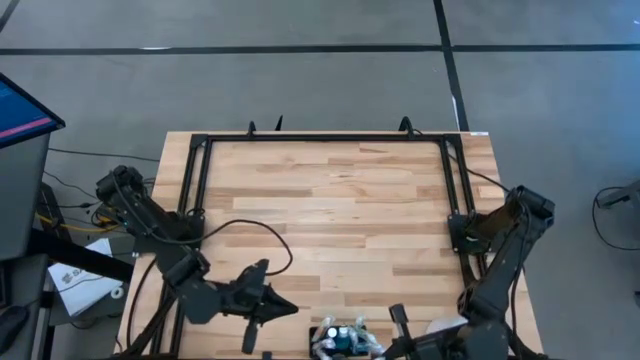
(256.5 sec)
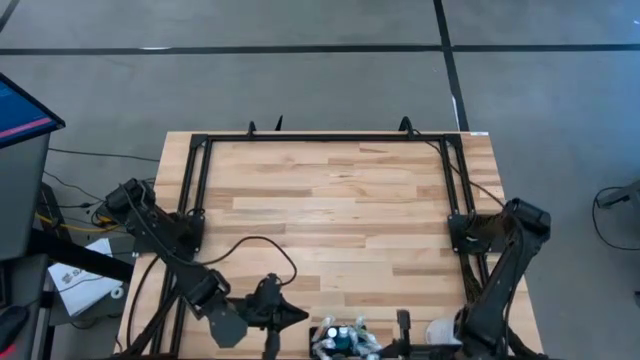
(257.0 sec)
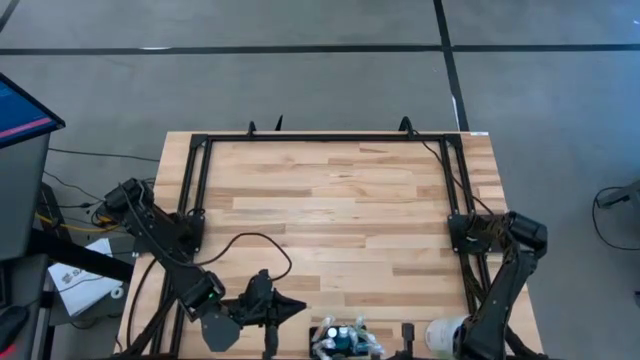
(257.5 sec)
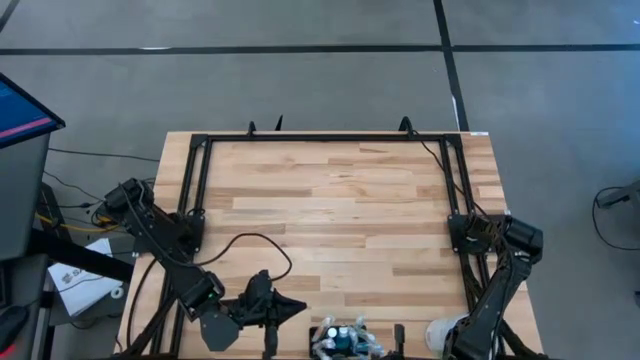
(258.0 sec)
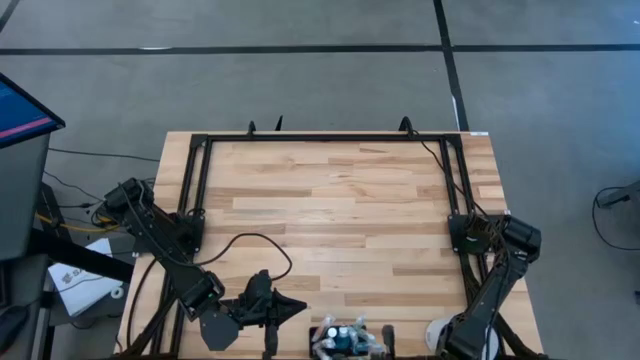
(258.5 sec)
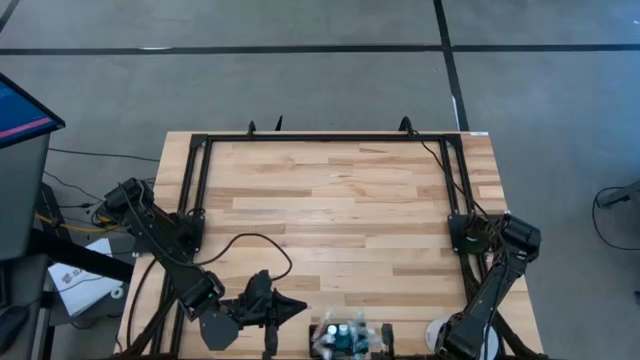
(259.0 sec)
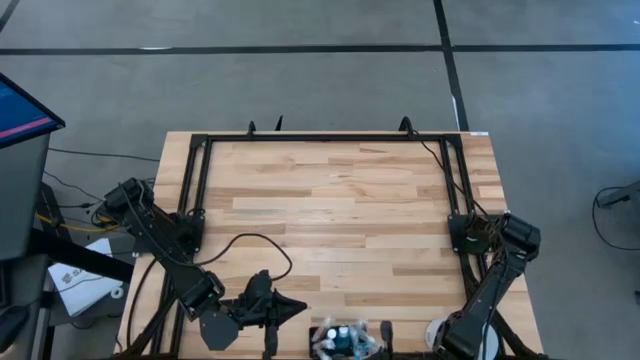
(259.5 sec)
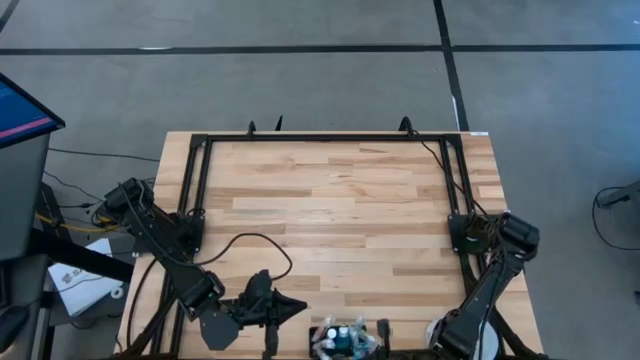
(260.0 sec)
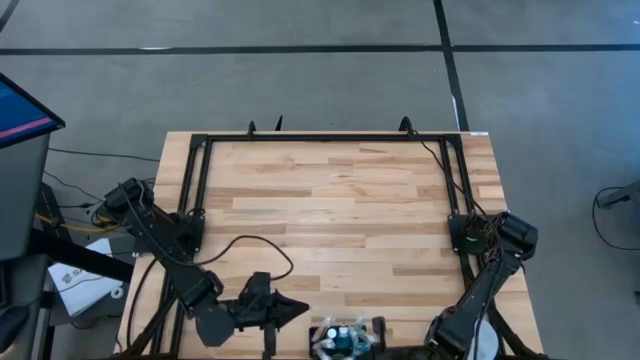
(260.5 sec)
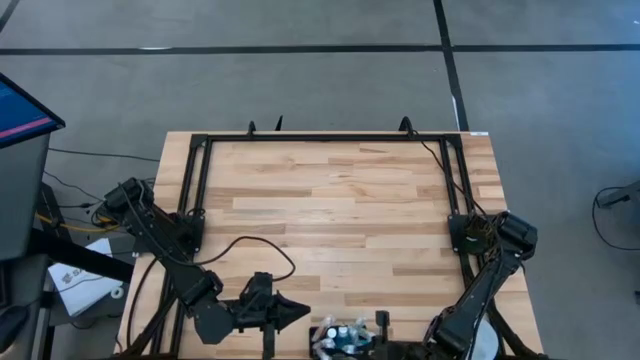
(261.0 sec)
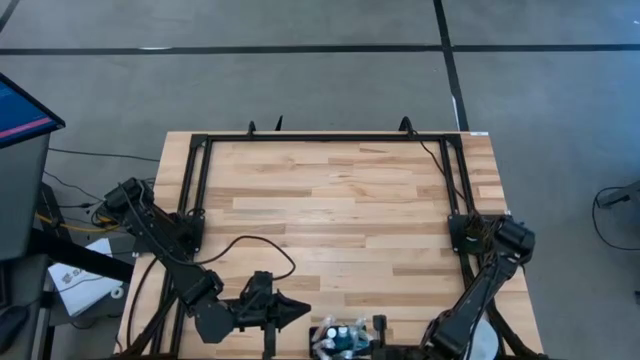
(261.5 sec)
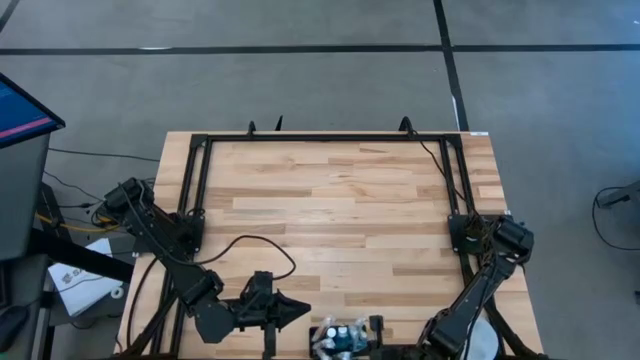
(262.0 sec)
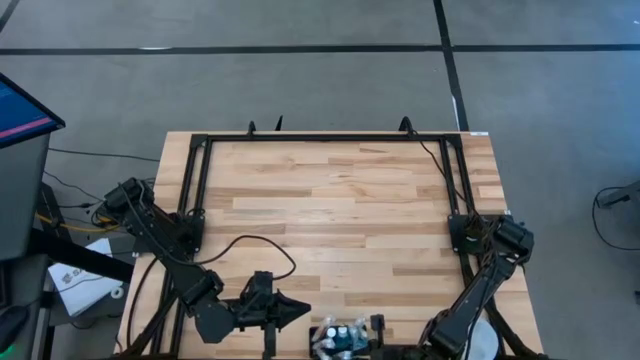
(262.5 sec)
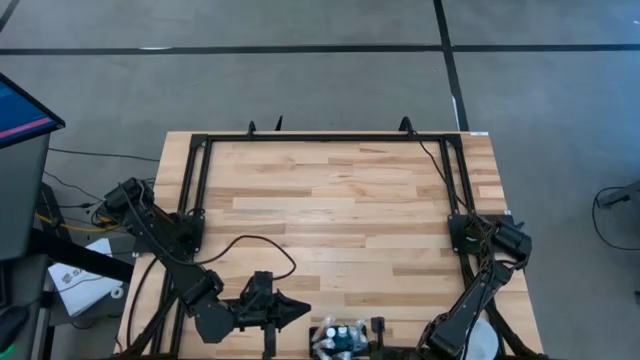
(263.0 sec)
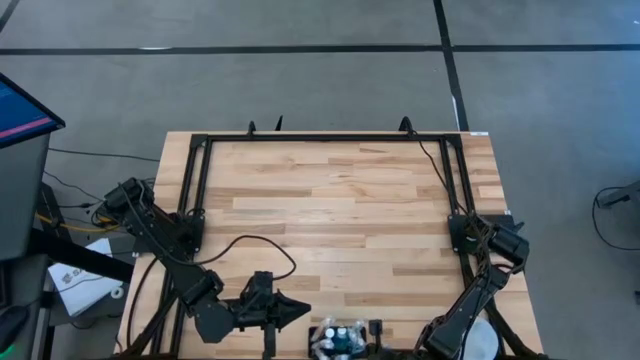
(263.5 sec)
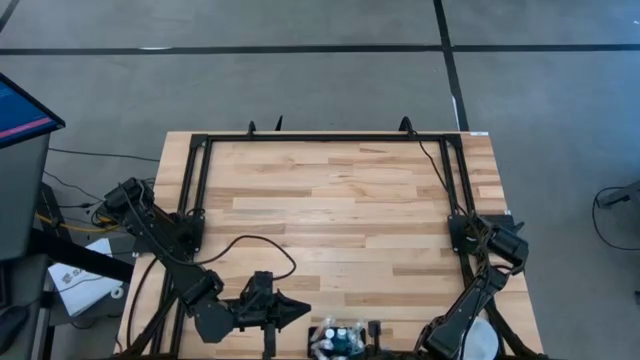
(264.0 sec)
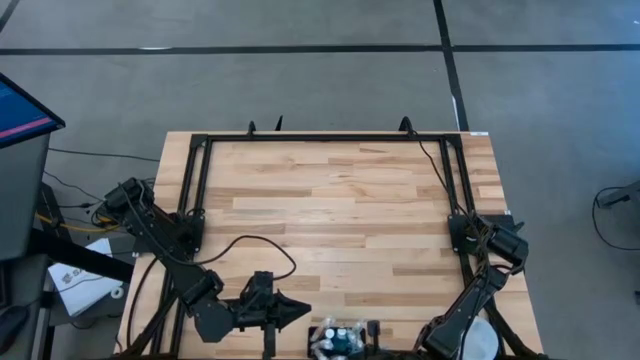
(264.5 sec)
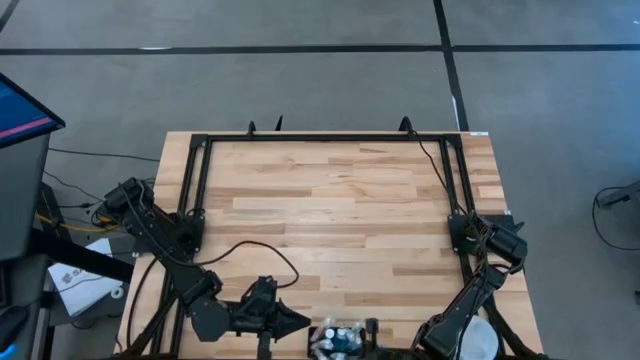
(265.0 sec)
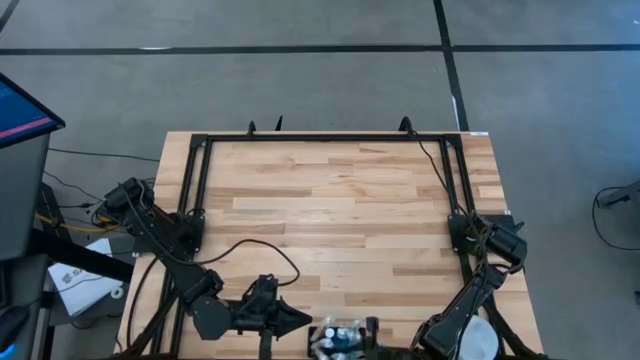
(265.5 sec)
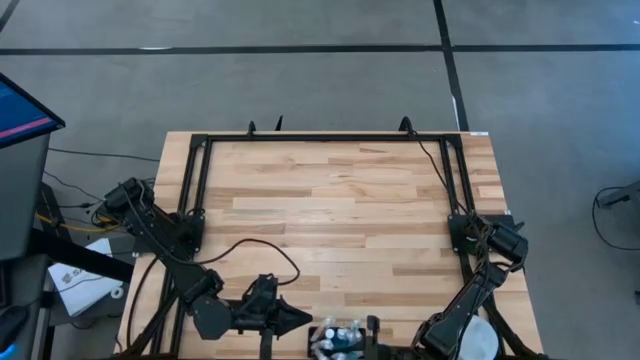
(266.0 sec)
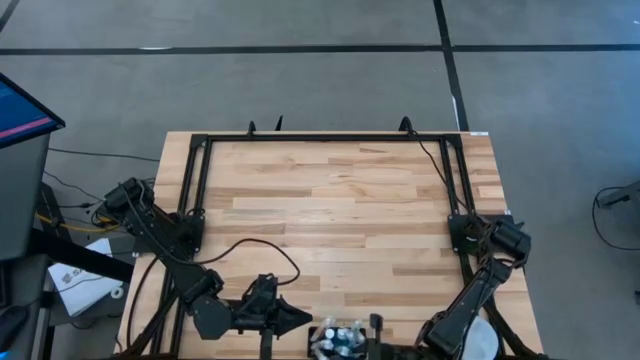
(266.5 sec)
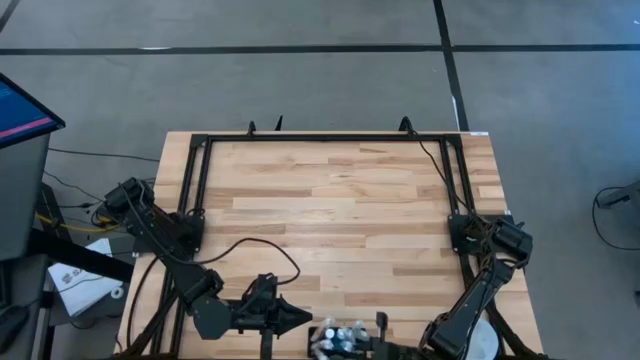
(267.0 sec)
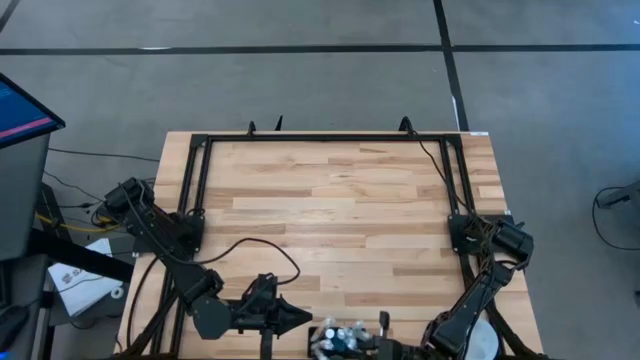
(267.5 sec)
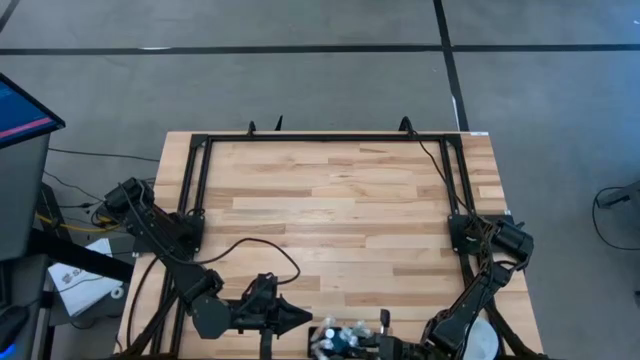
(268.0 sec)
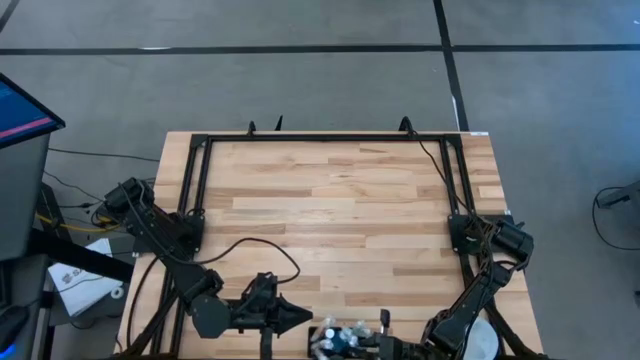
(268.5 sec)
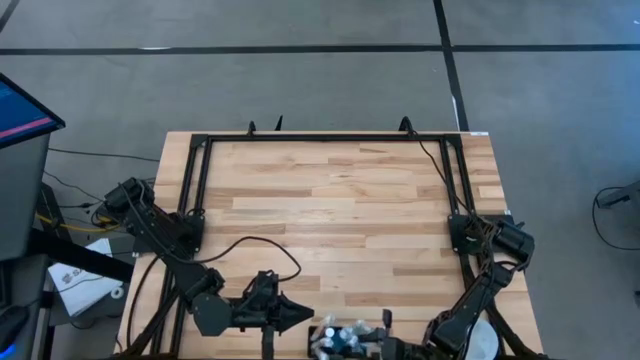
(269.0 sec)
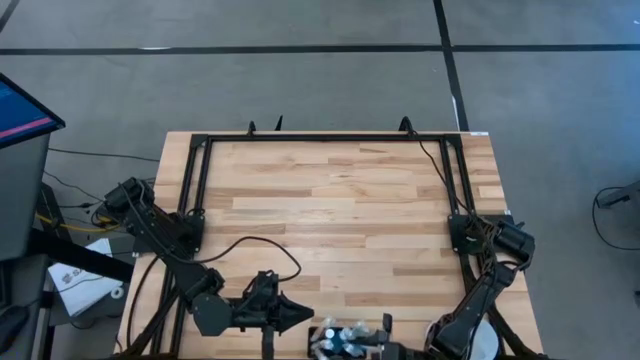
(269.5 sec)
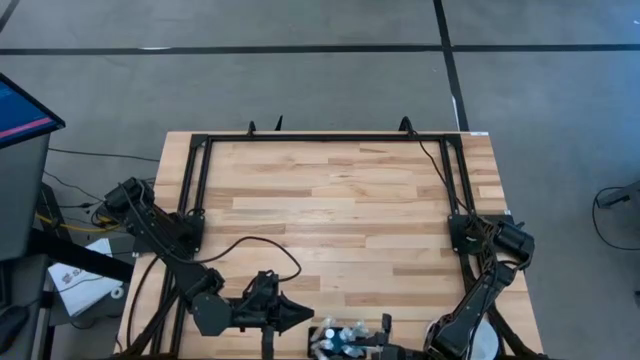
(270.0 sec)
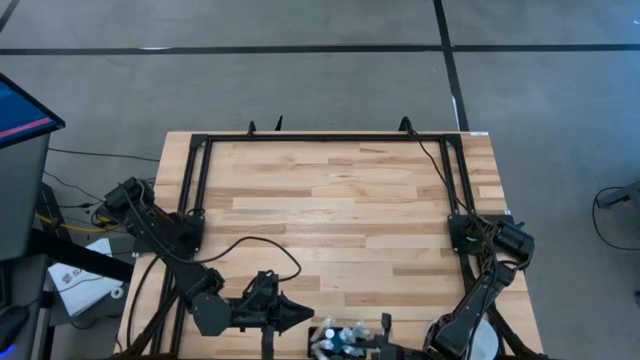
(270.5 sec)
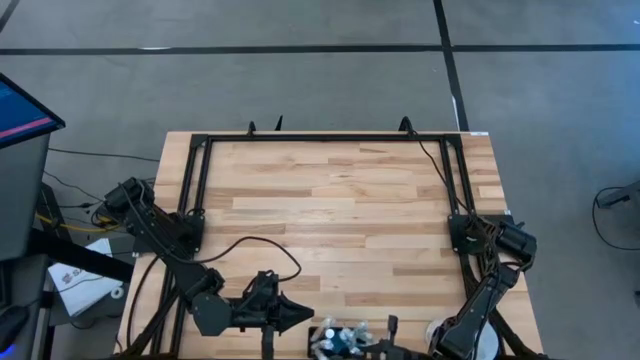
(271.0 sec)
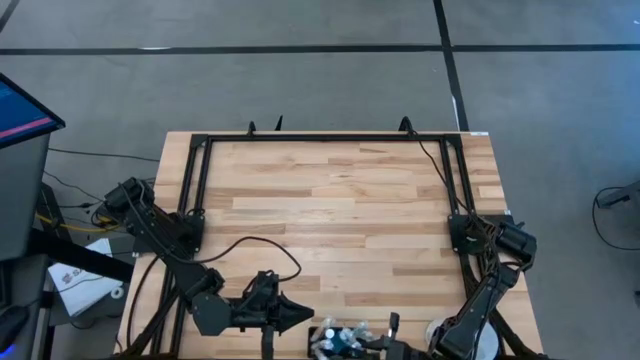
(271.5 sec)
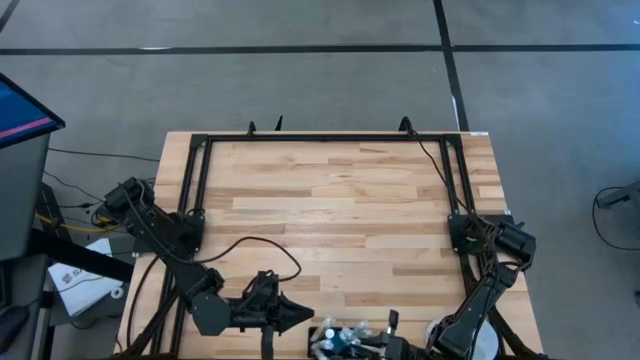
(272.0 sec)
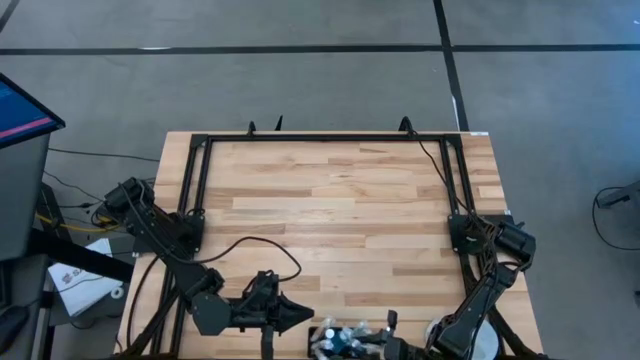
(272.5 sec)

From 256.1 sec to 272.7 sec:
Task: Pick & Place toothbrushing station
Put the blue toothbrush into the black mesh organizer
